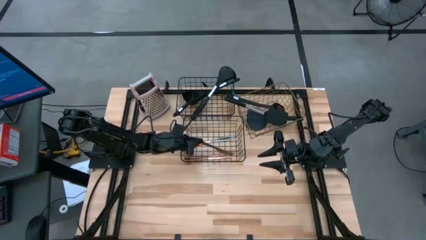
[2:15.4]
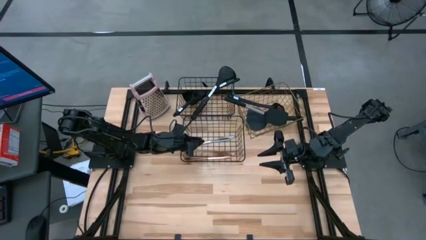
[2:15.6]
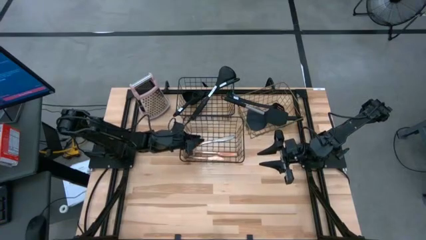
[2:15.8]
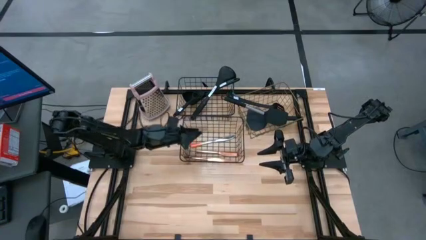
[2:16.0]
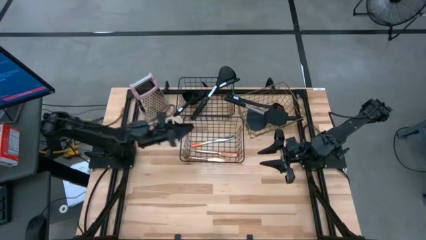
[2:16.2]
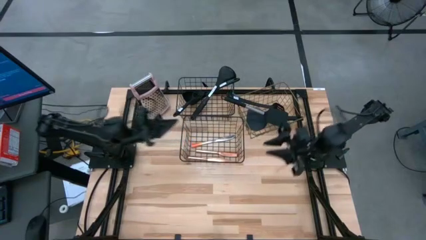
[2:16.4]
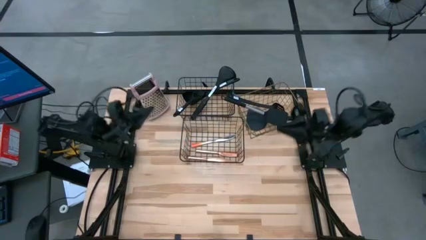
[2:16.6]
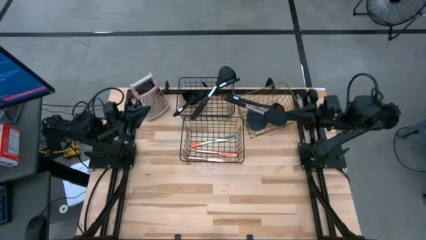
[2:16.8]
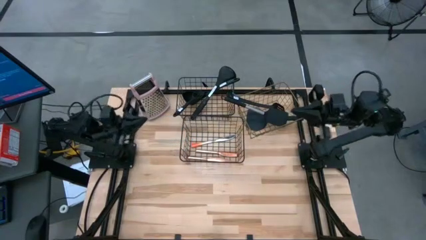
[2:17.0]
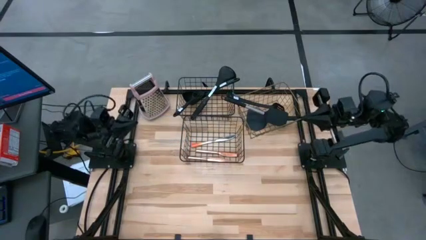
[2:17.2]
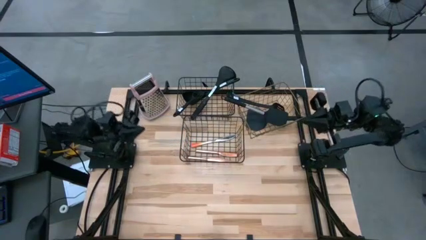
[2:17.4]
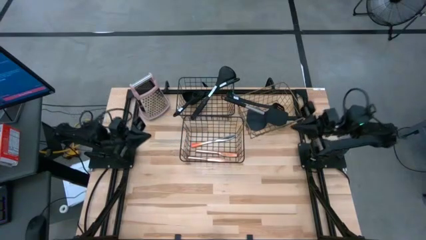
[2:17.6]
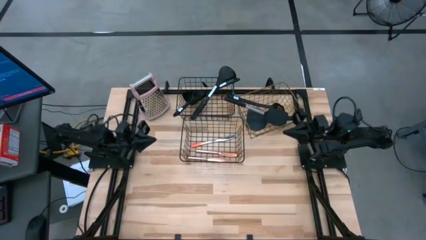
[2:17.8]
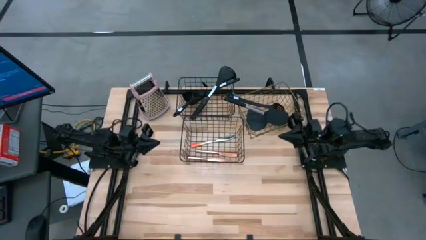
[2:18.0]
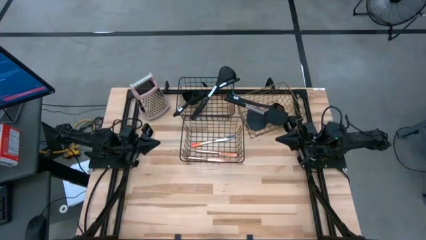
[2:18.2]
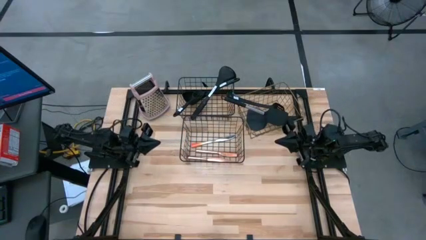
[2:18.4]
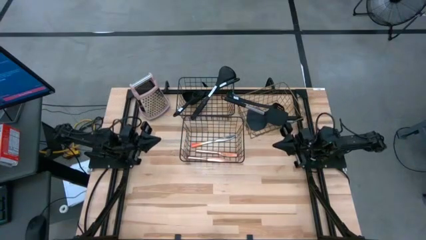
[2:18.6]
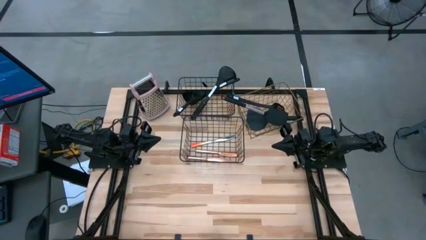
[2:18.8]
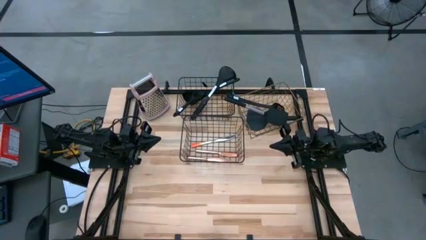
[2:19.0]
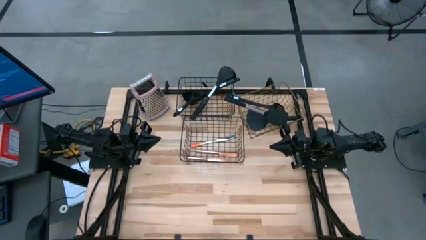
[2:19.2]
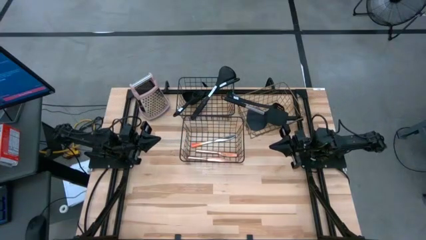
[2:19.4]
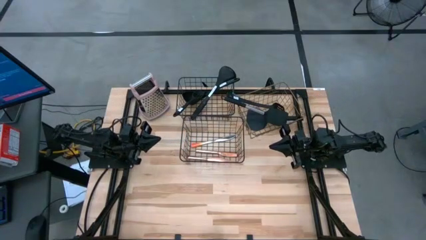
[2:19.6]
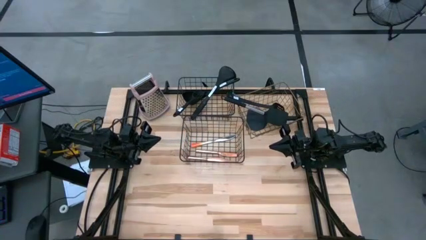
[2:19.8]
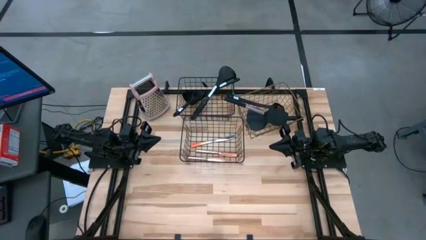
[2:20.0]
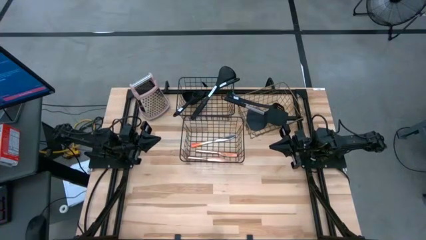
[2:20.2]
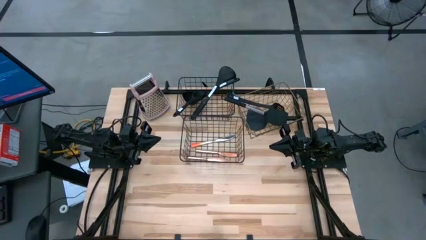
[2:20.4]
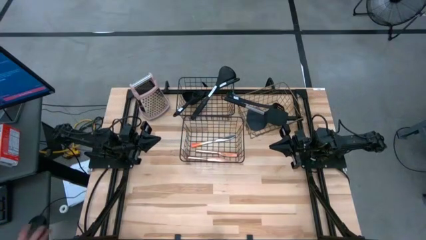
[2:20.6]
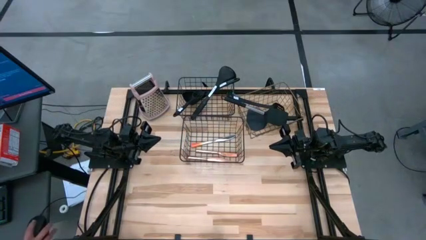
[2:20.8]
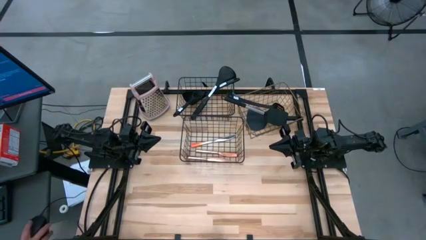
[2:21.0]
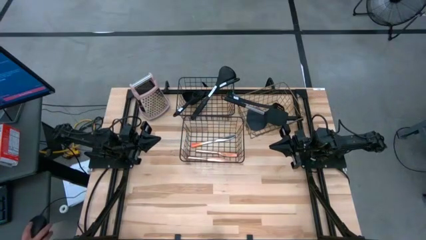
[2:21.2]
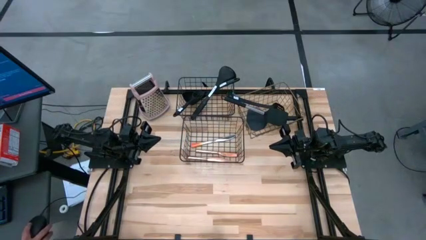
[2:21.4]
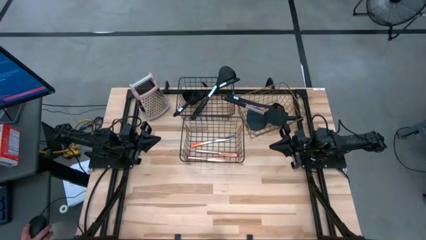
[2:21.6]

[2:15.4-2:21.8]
Task: Pick & Place Kitchen Items
Return to Home Position

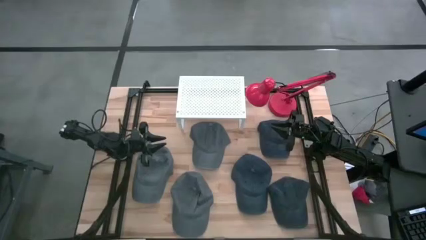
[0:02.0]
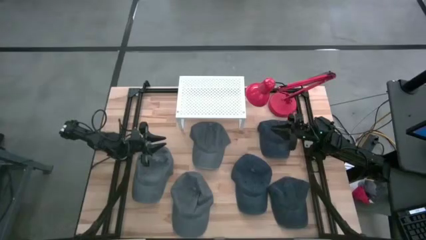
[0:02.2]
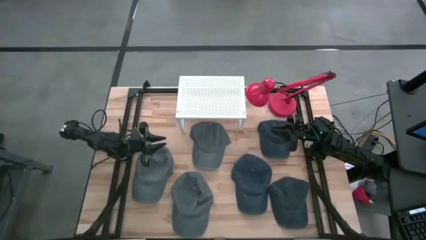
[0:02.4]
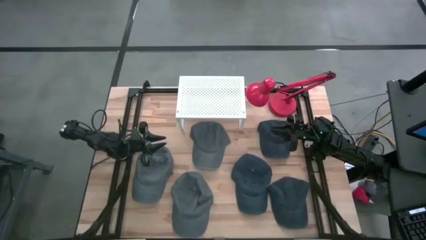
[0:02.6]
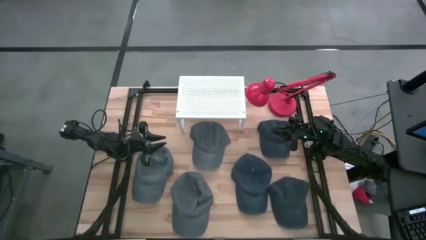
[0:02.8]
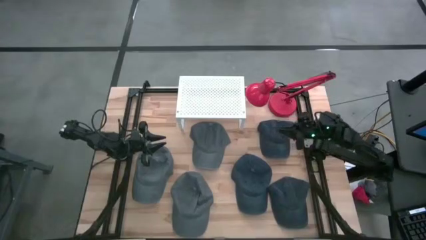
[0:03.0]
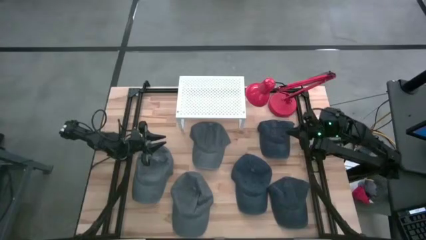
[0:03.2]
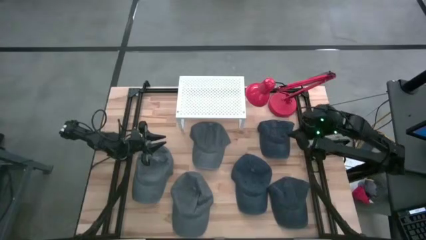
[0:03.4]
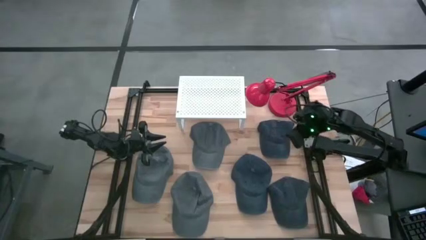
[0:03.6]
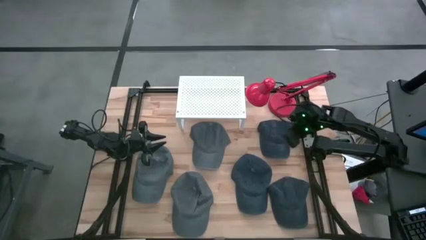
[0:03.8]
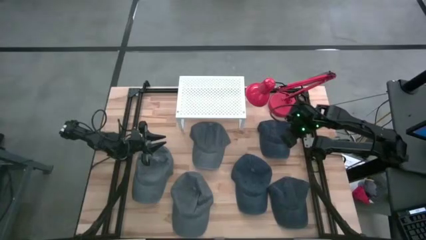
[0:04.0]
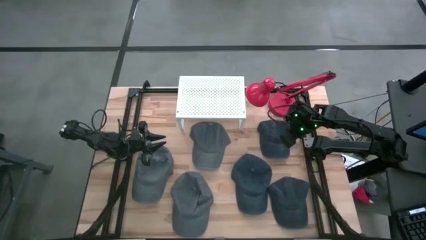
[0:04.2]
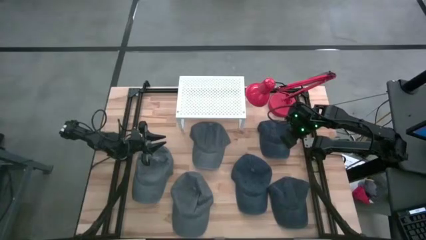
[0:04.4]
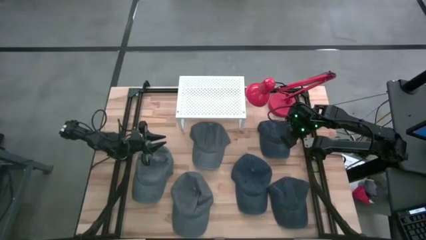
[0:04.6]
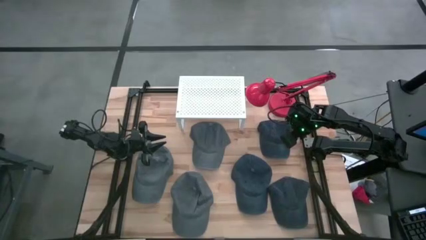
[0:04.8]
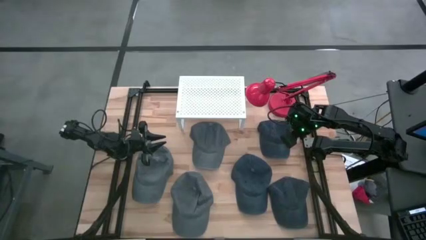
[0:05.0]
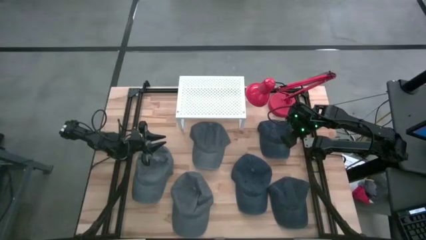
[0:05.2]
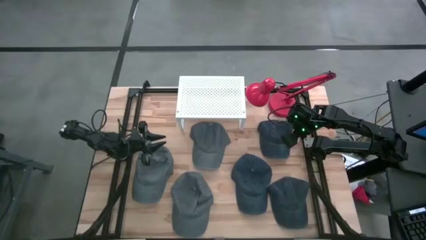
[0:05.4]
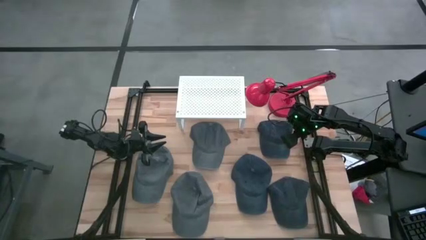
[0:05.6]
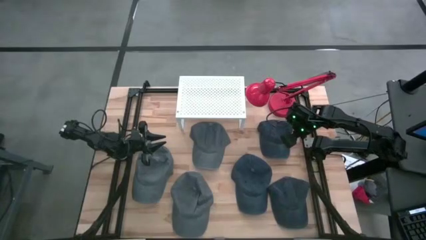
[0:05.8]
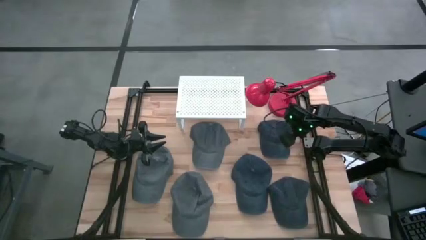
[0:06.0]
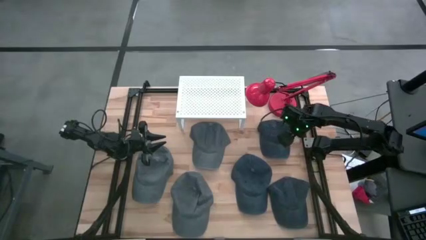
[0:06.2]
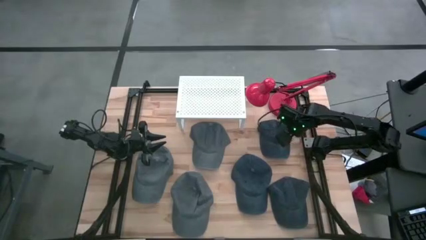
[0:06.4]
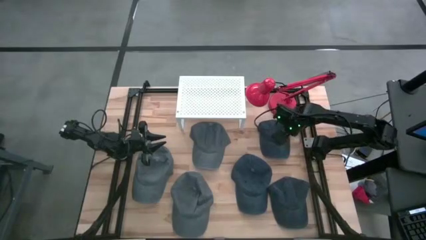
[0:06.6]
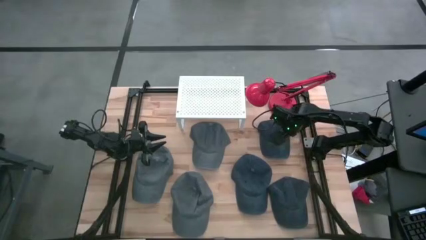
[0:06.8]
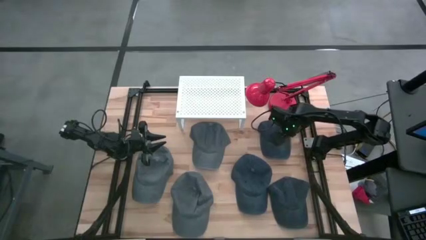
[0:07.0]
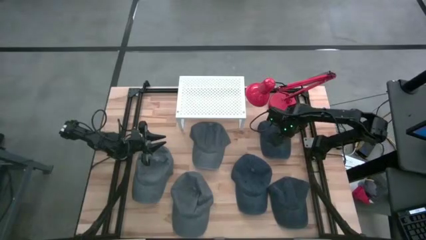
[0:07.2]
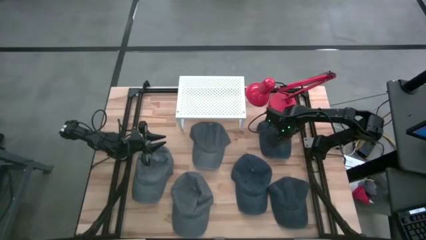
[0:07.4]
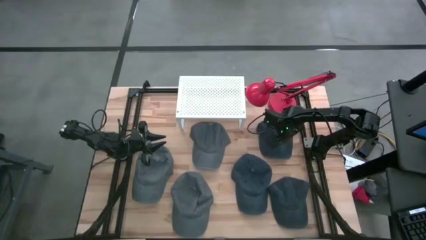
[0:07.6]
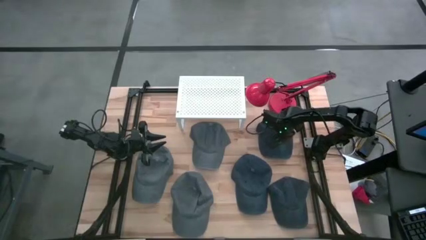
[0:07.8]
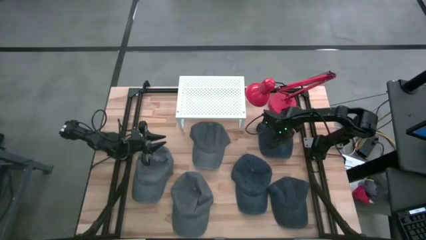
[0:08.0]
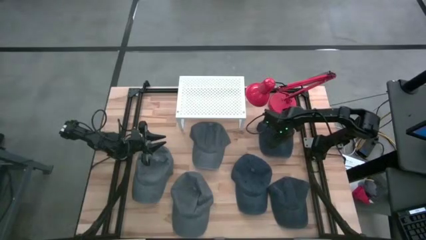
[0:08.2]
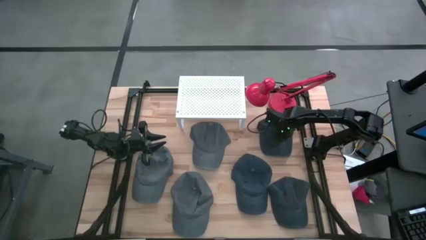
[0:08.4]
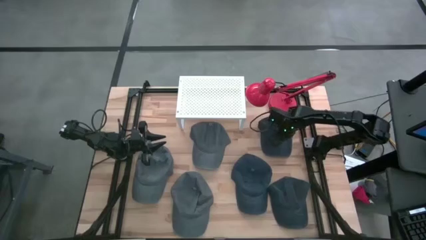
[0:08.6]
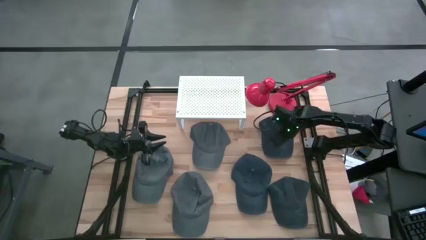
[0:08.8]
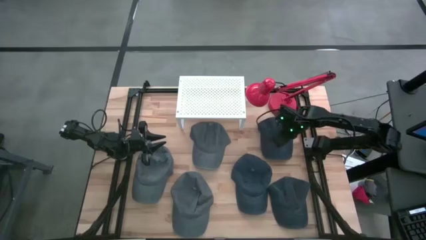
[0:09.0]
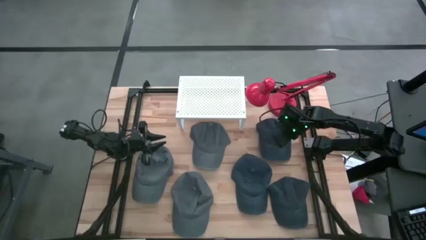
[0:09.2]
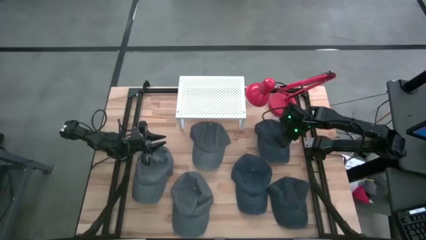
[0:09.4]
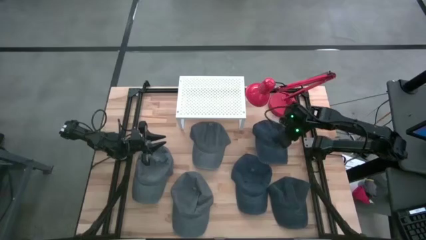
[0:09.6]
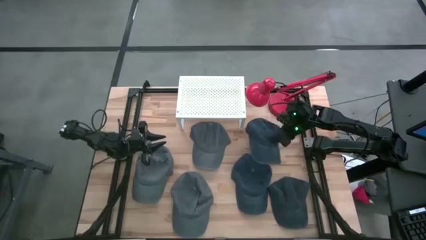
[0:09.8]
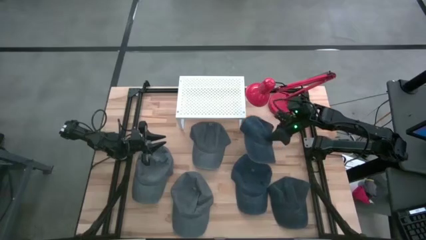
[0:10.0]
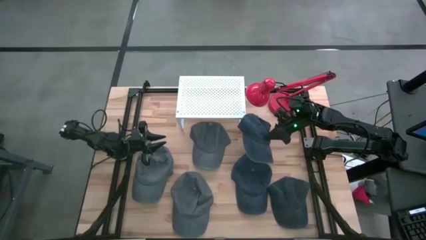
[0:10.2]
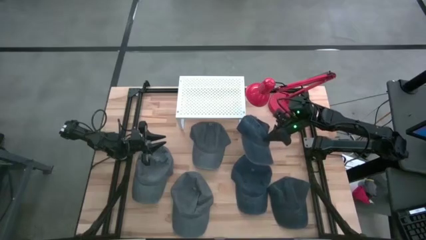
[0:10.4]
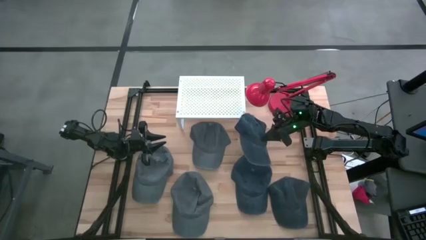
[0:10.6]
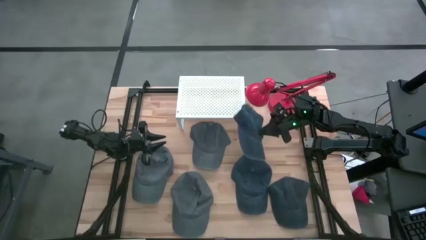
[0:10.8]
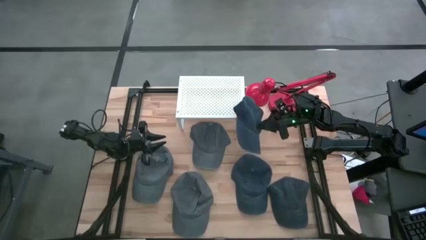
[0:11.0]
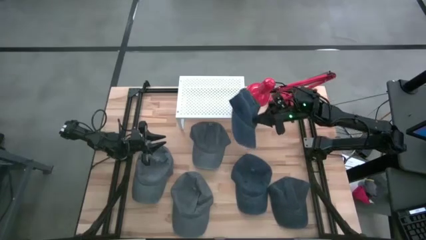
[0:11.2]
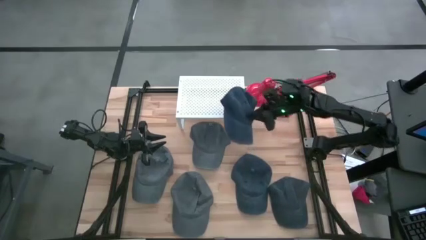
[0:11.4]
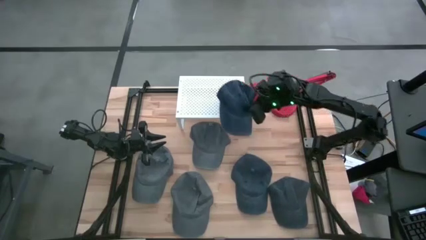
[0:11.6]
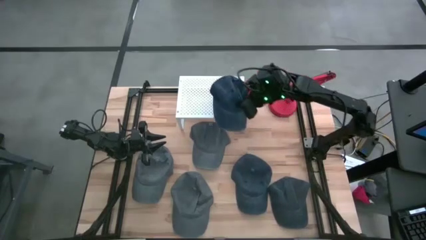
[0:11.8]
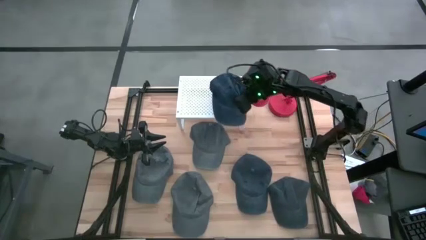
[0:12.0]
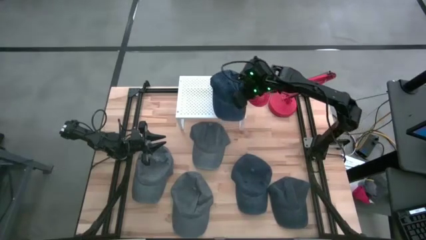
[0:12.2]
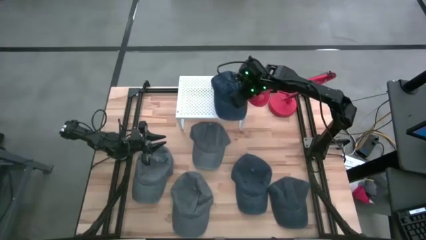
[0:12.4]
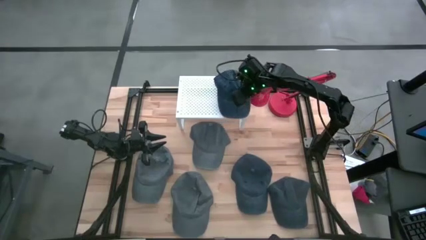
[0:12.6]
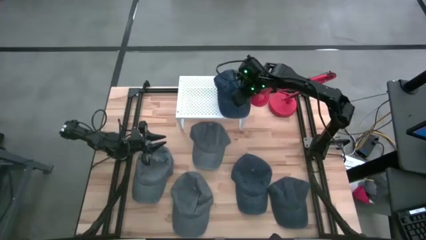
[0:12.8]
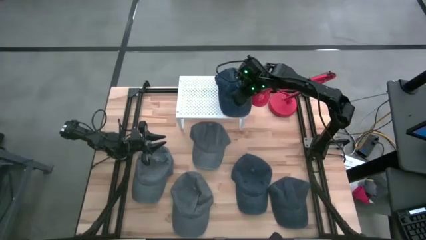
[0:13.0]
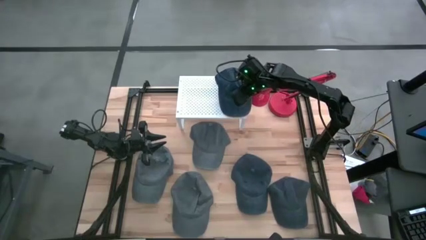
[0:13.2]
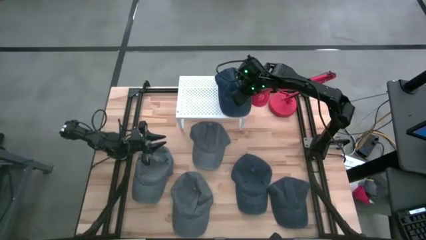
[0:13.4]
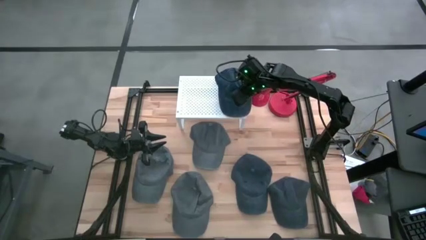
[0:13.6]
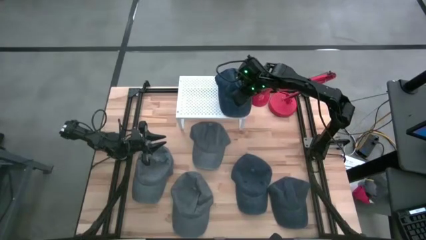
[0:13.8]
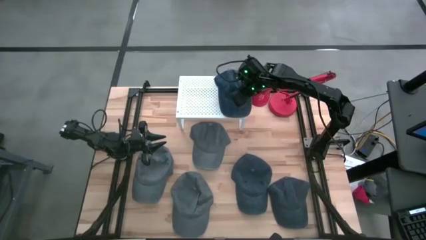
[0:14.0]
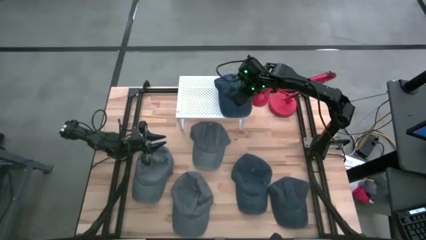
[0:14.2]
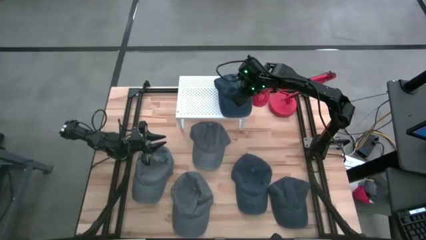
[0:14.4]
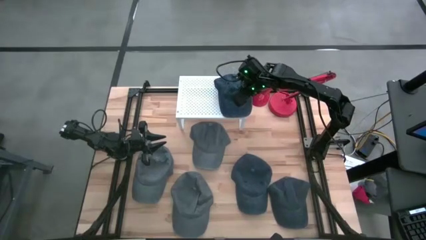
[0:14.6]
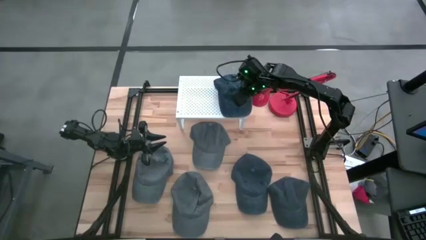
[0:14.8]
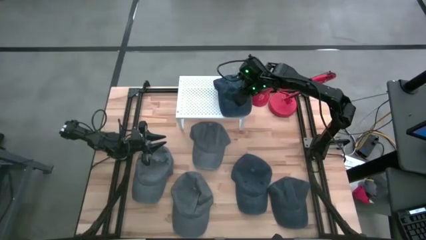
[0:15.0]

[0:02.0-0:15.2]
Task: Pick & Place hat
Put the top dark blue cap on the shelf
